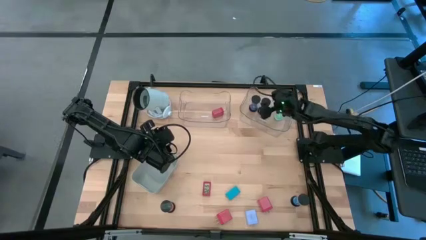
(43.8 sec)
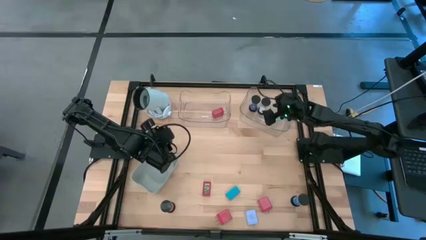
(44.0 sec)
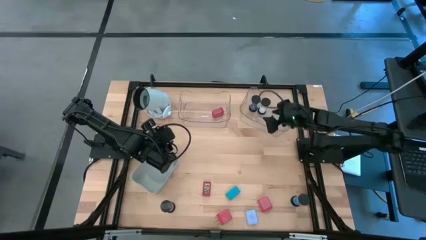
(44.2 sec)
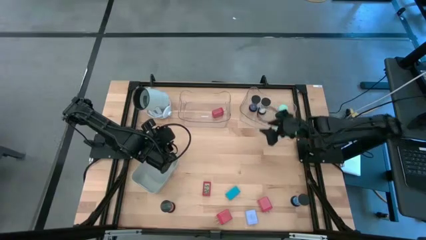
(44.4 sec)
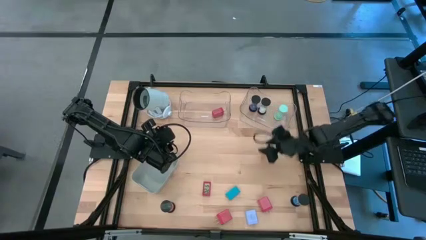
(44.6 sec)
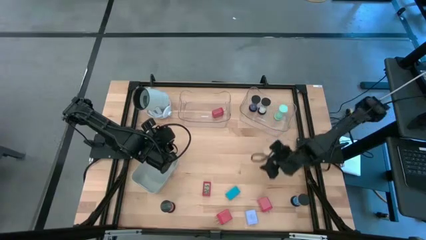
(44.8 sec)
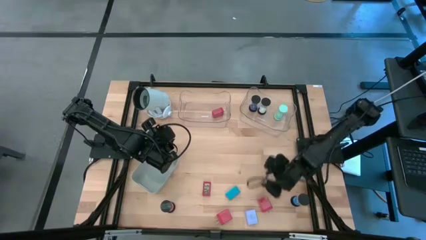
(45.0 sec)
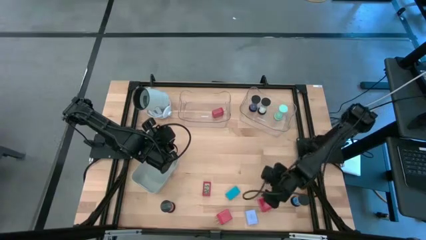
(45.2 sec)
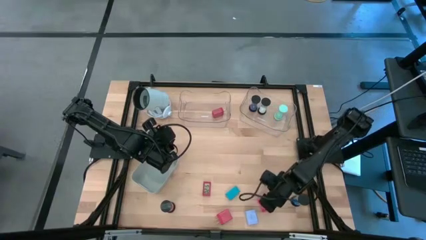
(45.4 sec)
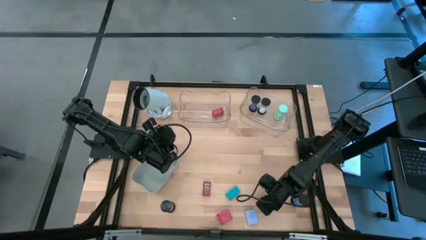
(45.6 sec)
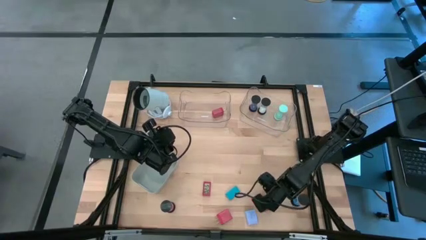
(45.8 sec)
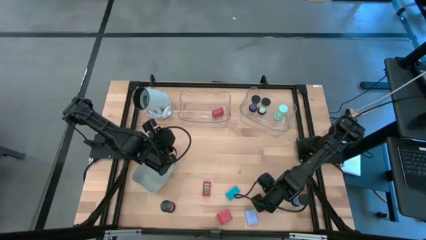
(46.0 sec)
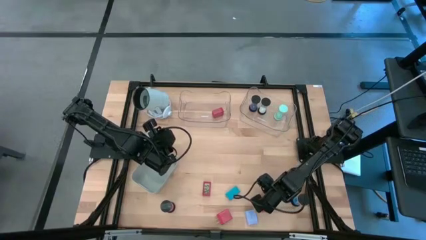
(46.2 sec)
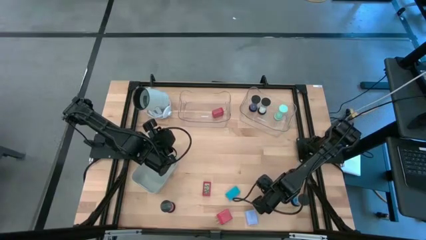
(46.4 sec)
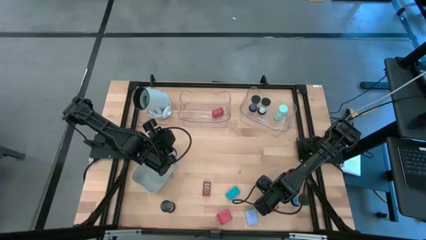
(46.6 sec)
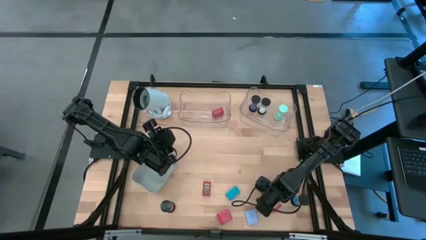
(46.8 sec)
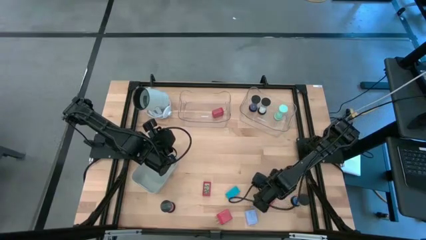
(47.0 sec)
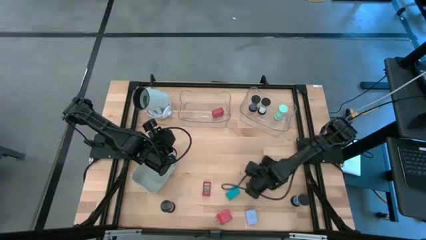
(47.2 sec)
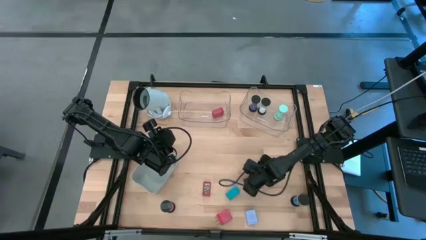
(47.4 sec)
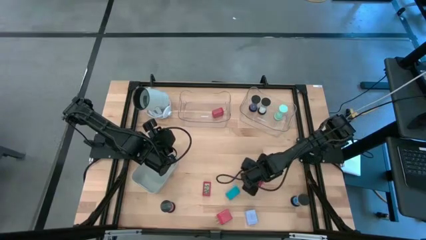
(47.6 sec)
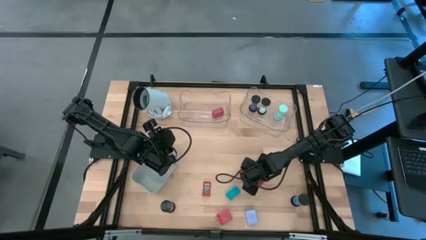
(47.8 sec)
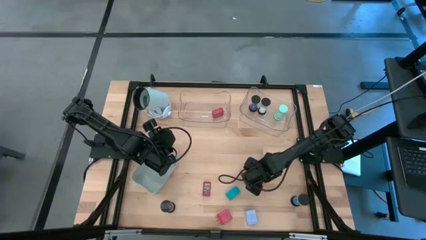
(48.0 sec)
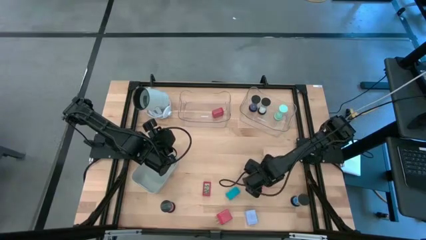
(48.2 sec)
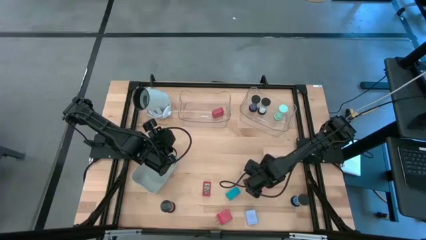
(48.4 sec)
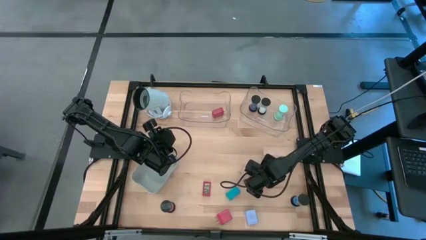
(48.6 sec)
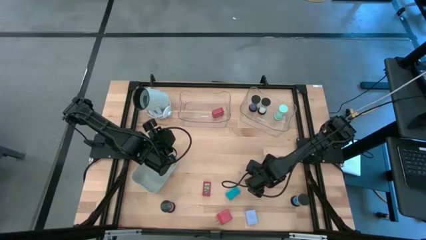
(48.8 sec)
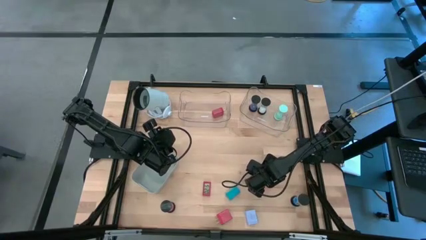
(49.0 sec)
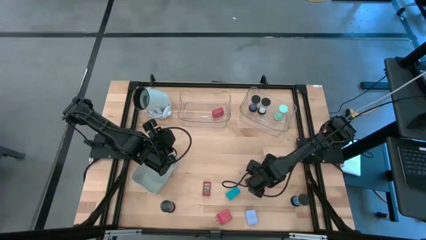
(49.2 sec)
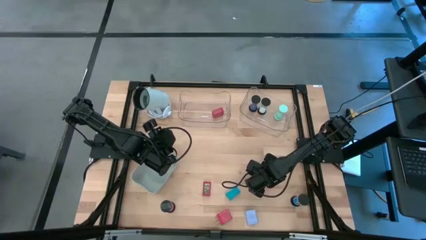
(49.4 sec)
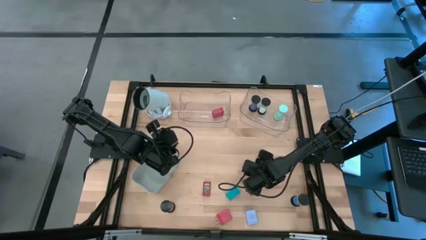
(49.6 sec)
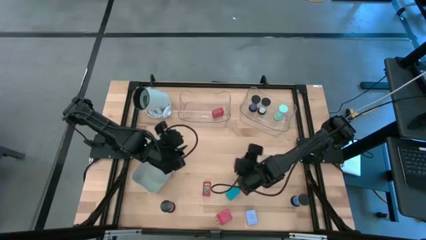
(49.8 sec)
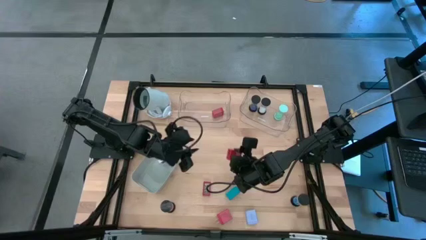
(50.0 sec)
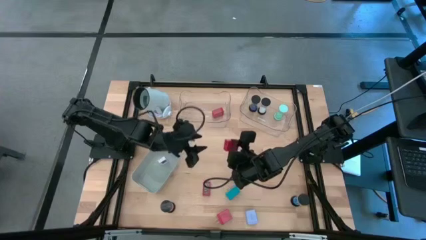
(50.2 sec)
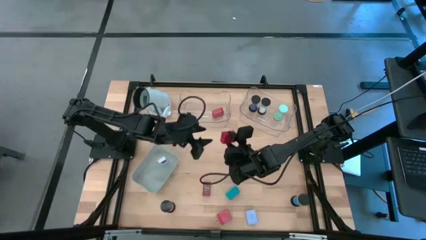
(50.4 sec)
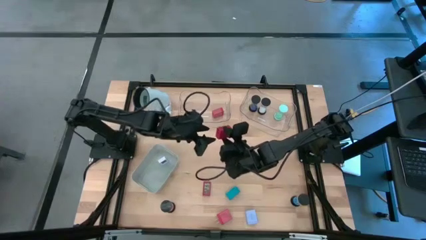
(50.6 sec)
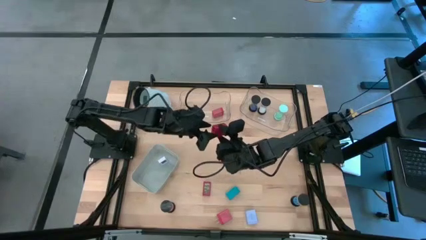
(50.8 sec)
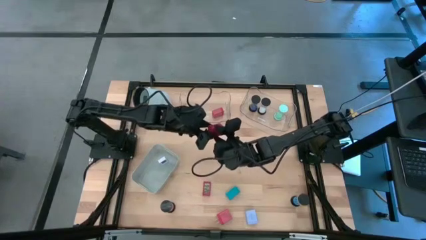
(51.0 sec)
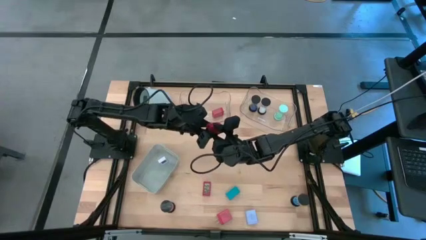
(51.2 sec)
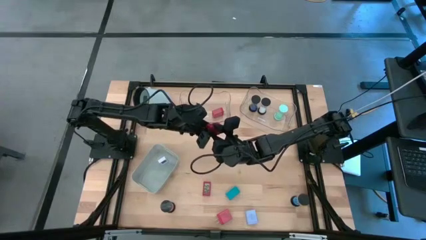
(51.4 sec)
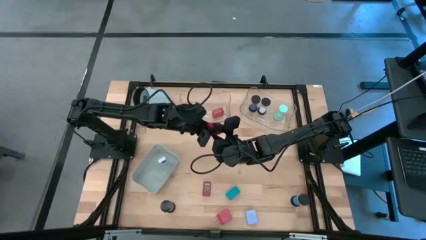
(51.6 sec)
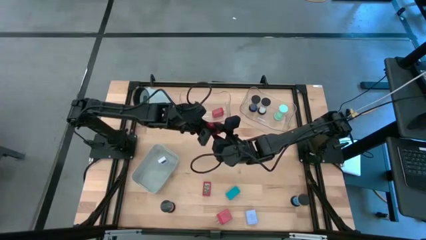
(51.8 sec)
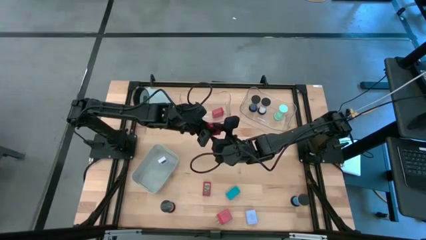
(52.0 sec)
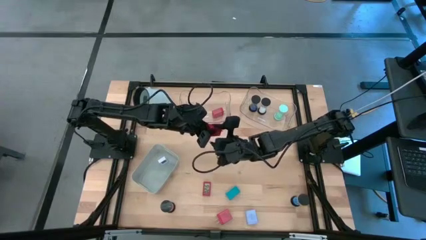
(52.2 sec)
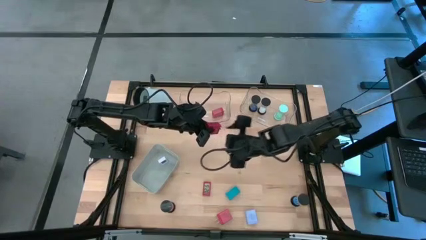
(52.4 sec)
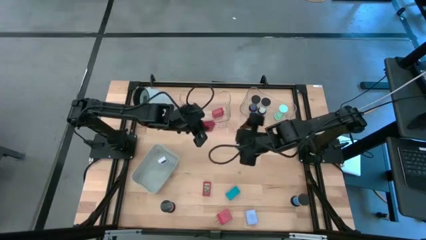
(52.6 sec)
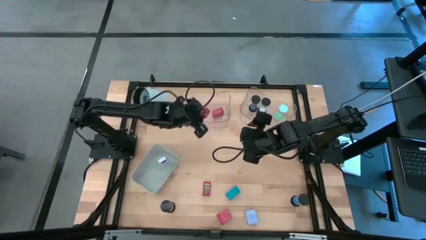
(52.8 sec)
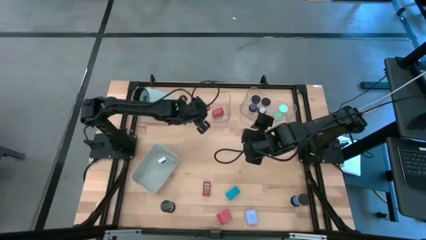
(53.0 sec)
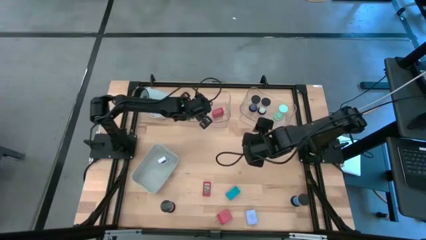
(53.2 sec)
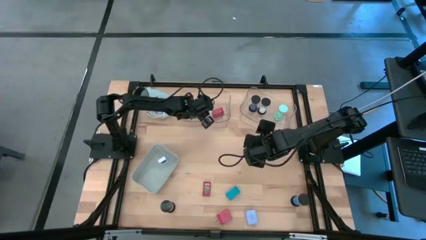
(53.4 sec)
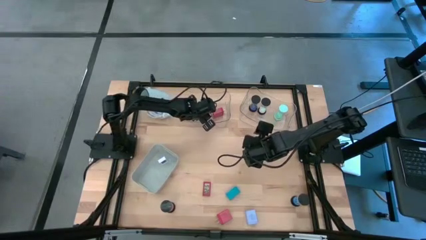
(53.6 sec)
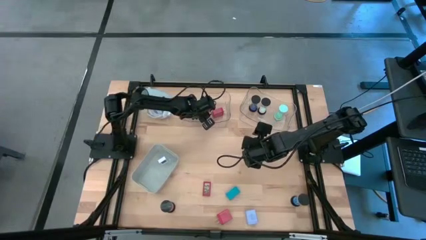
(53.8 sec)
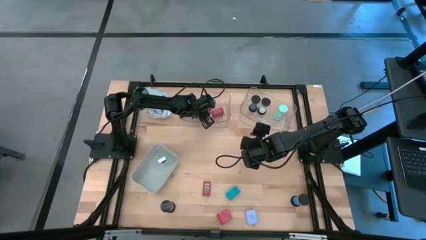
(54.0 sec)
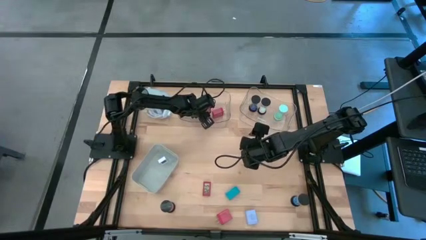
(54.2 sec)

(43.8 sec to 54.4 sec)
Task: Pick & Place Office items
Put the right red charger adapter into the left transparent bin

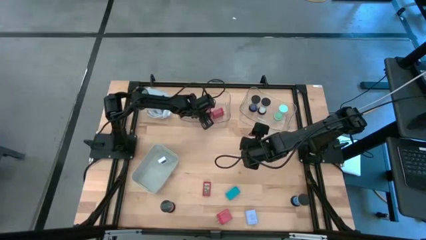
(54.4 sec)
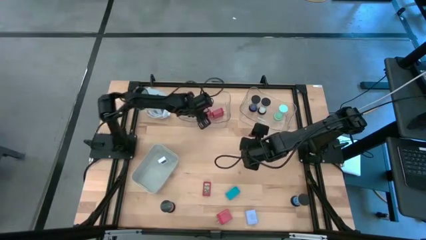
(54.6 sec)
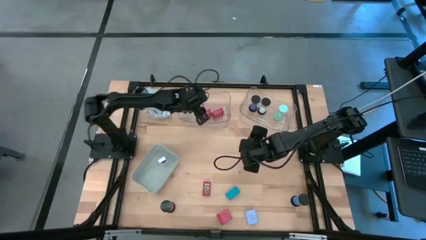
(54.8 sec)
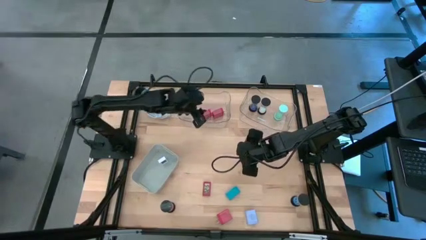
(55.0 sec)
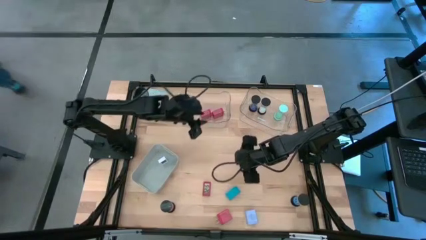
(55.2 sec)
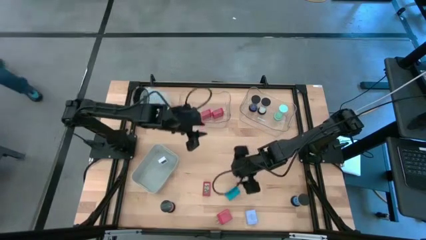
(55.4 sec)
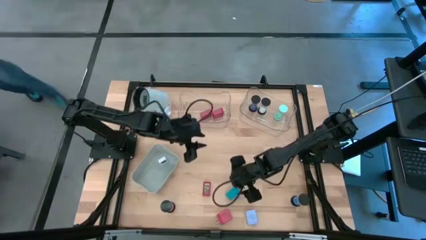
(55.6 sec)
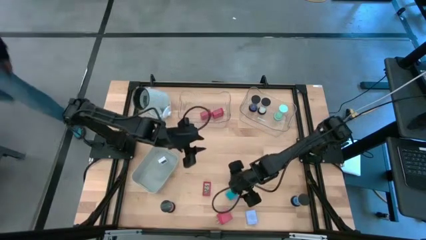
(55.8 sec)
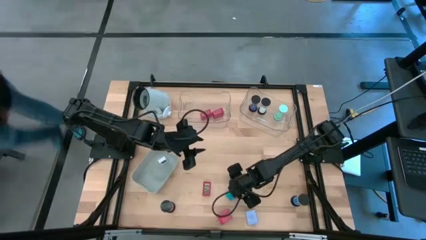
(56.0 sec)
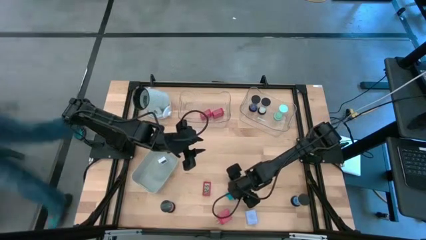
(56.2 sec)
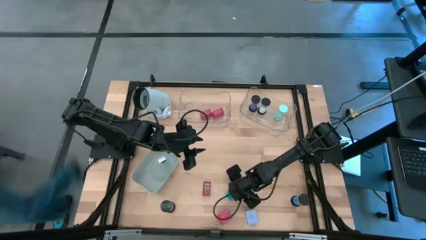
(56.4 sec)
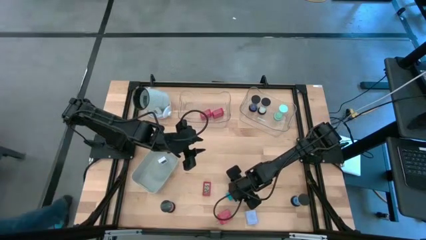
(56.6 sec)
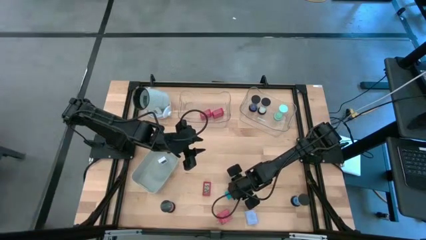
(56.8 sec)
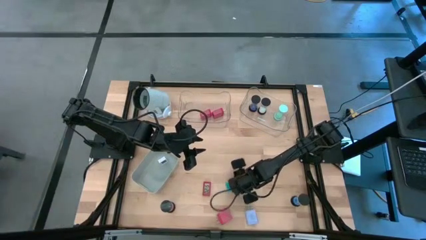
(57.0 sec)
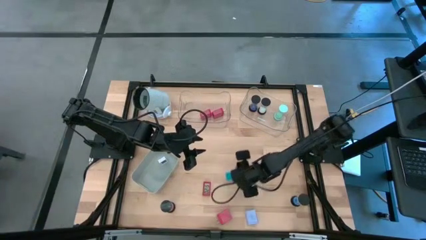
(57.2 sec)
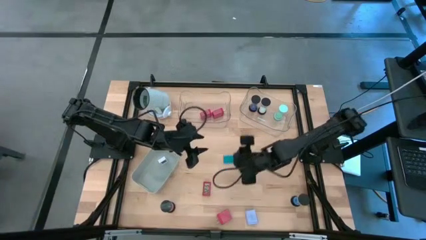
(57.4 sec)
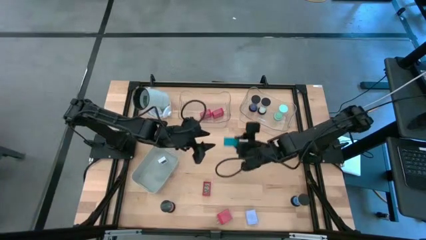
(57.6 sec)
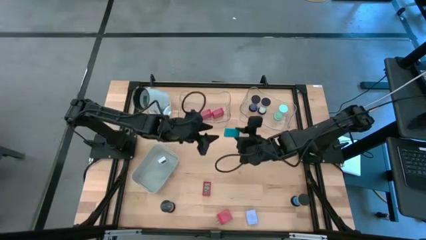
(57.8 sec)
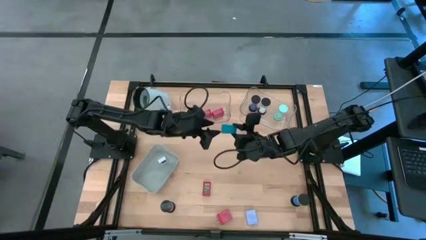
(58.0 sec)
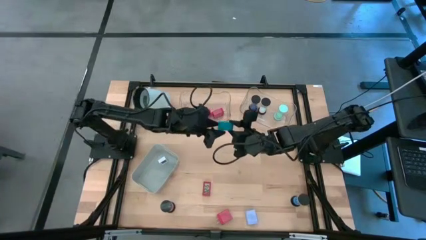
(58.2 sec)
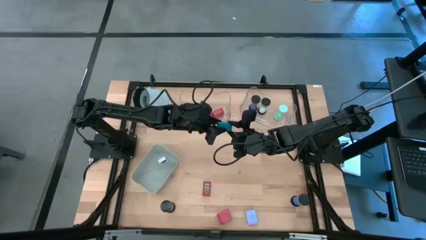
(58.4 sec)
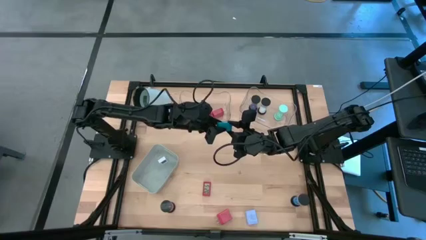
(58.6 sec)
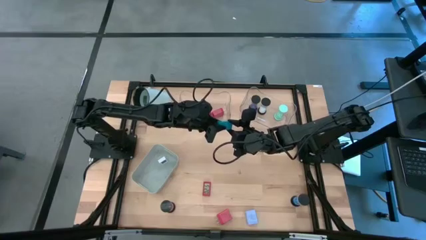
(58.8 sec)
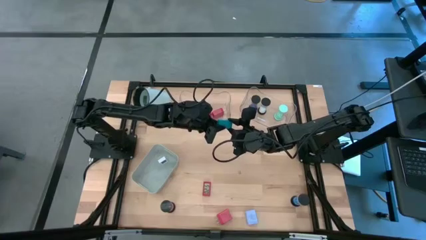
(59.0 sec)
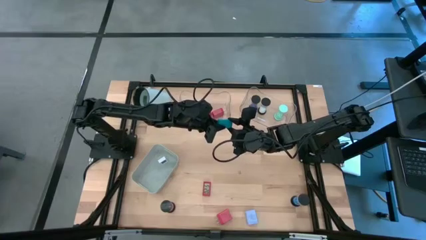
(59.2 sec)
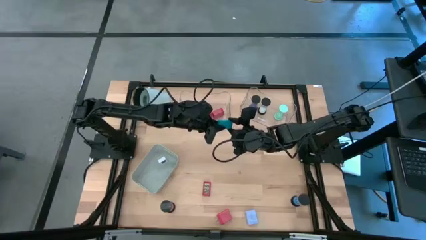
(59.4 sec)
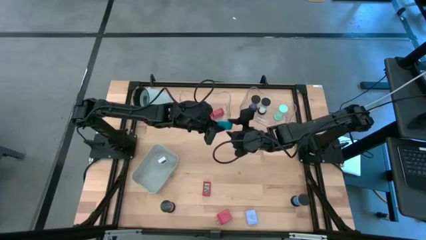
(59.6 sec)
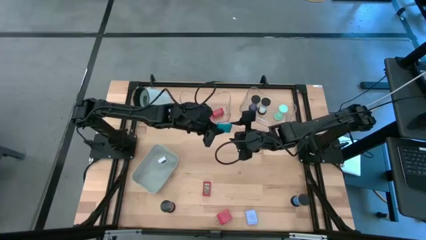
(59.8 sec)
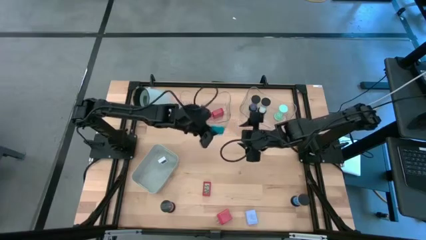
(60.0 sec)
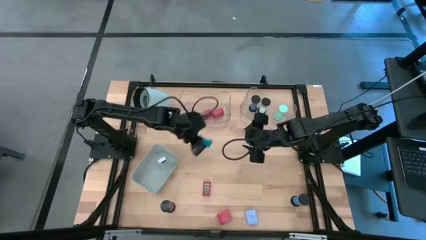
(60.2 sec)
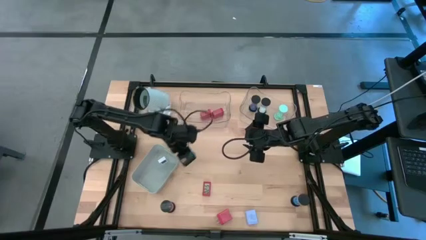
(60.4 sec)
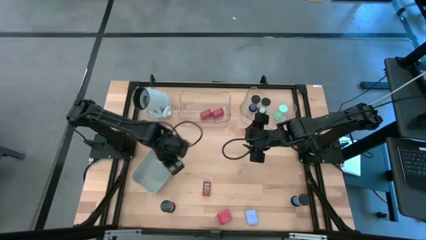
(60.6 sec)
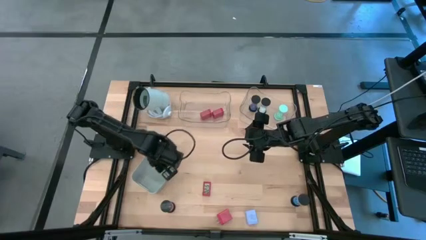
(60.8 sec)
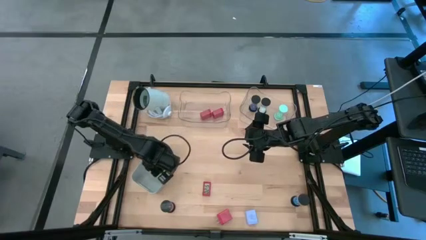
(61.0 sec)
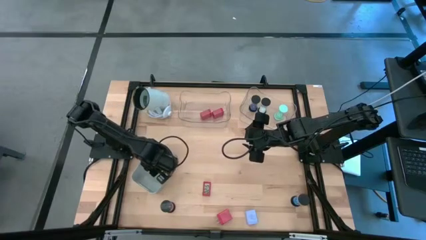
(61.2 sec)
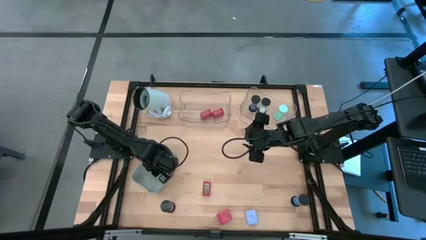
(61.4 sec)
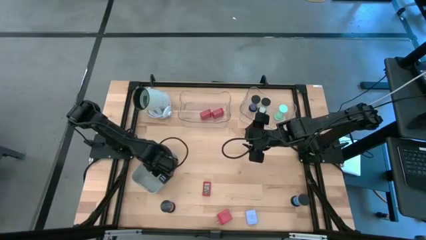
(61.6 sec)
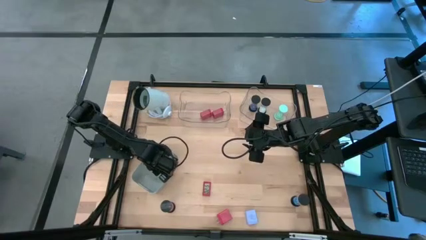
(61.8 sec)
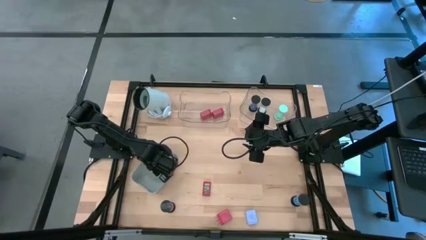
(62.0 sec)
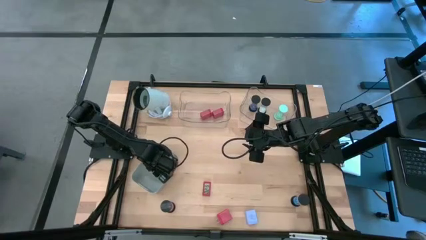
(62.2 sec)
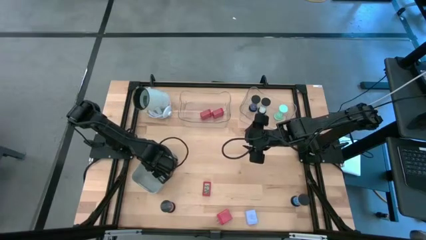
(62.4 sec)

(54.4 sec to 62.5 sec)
Put the blue digital clock into the gray bin
